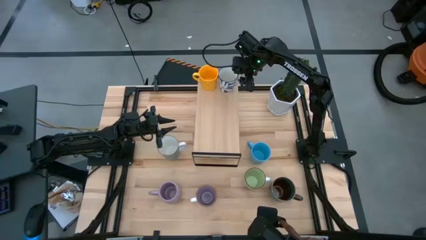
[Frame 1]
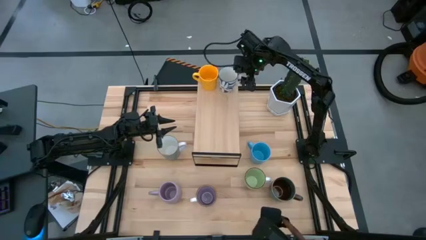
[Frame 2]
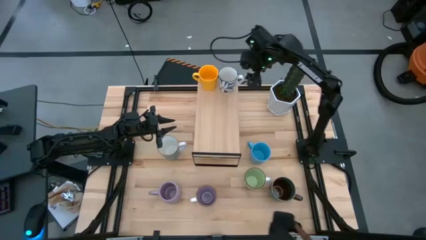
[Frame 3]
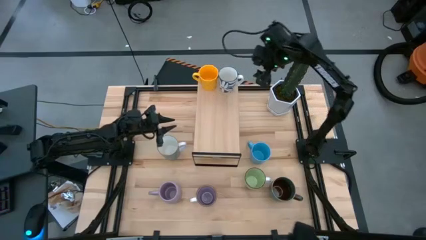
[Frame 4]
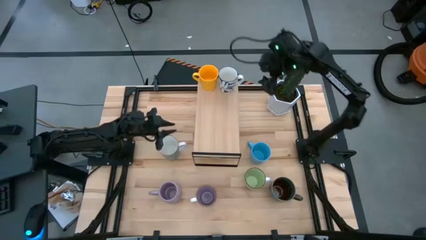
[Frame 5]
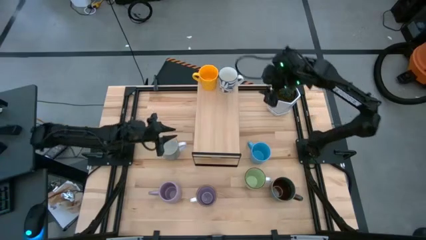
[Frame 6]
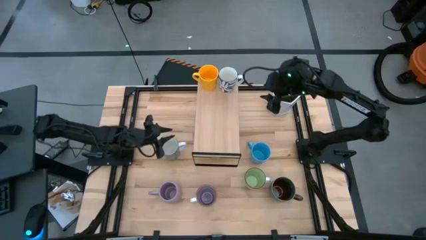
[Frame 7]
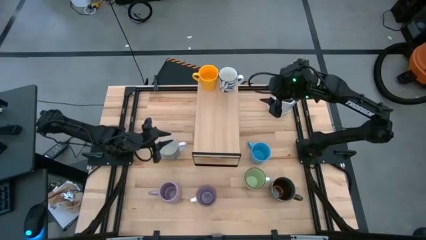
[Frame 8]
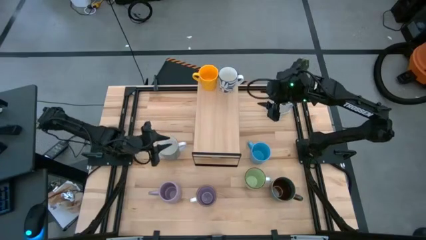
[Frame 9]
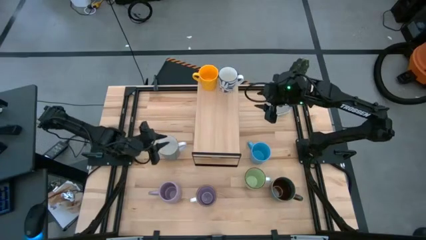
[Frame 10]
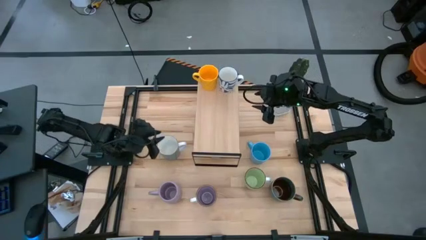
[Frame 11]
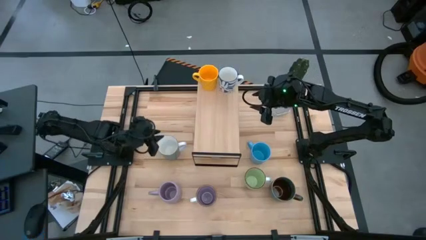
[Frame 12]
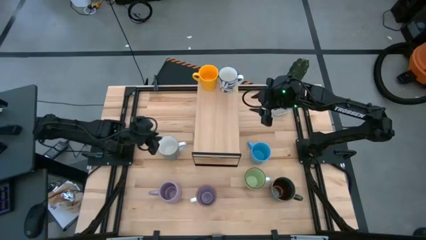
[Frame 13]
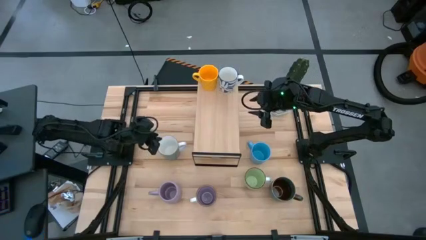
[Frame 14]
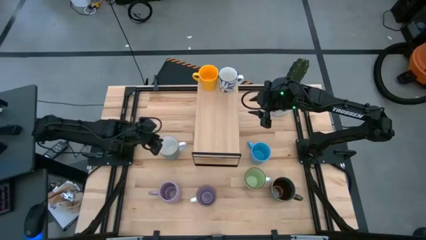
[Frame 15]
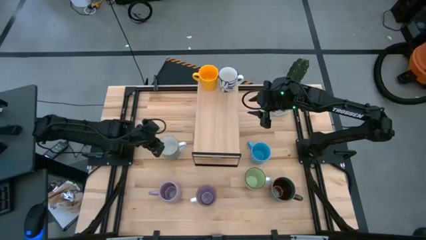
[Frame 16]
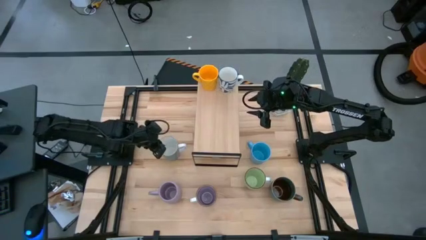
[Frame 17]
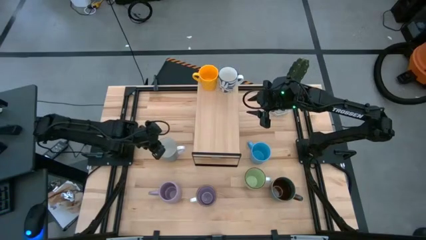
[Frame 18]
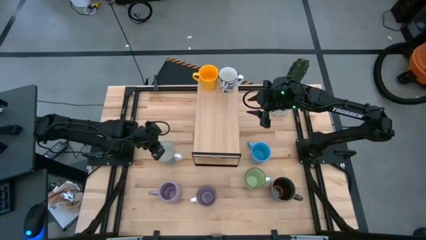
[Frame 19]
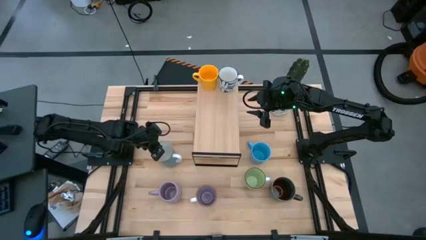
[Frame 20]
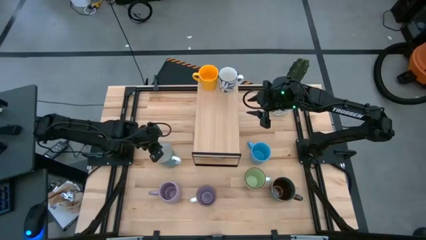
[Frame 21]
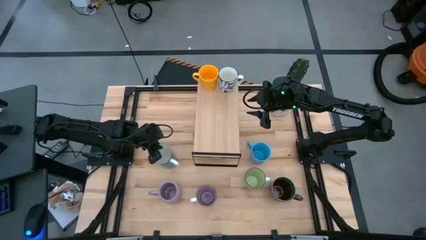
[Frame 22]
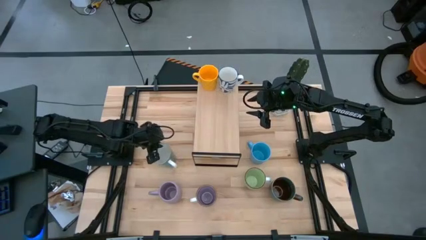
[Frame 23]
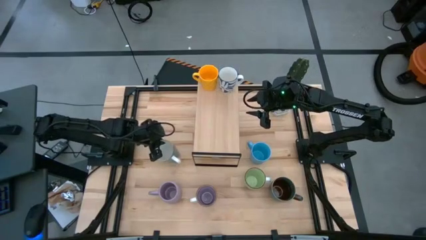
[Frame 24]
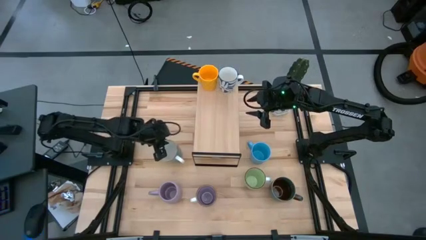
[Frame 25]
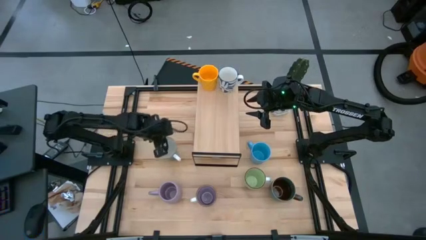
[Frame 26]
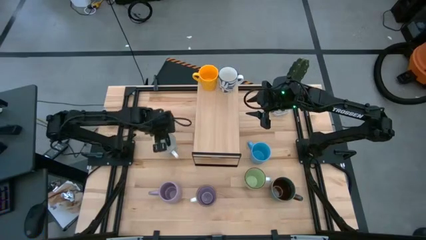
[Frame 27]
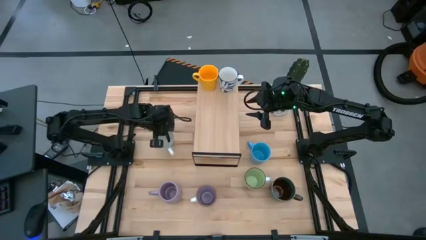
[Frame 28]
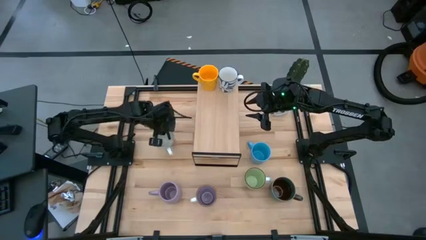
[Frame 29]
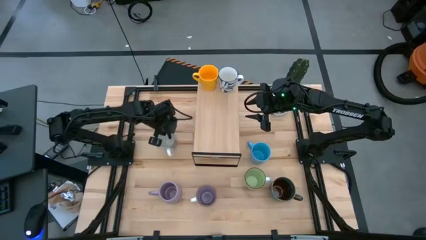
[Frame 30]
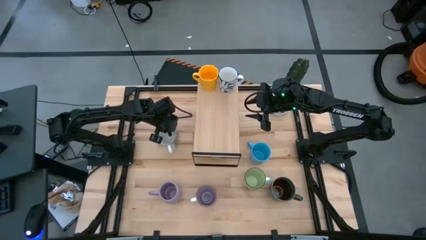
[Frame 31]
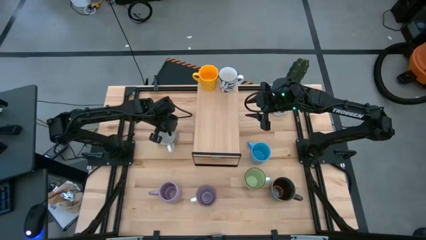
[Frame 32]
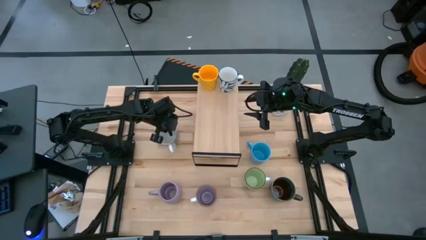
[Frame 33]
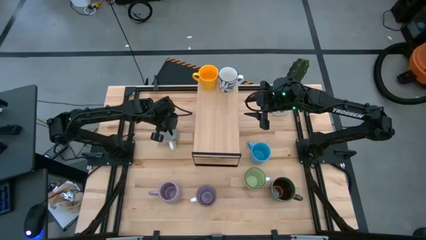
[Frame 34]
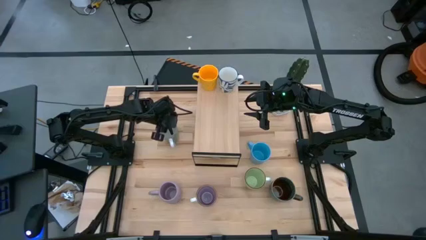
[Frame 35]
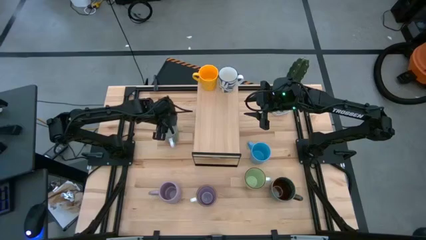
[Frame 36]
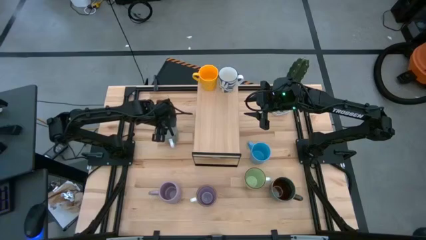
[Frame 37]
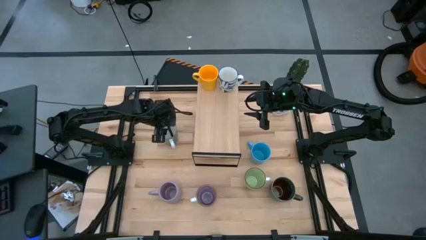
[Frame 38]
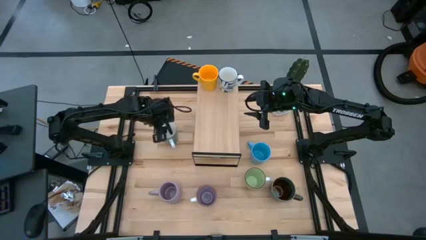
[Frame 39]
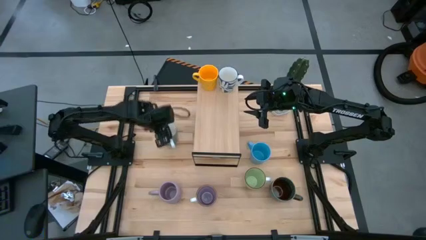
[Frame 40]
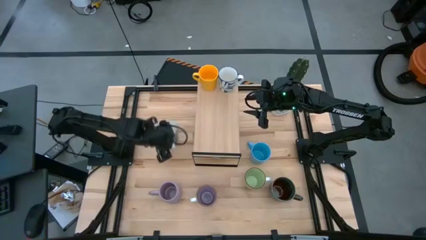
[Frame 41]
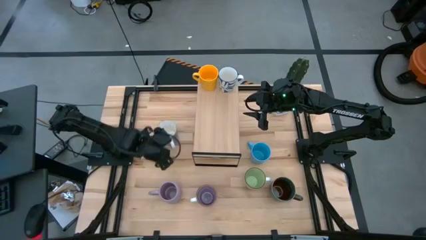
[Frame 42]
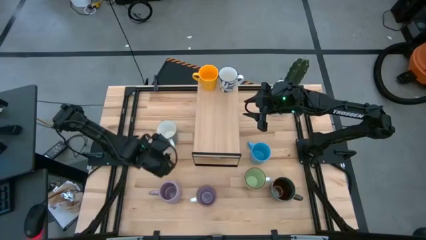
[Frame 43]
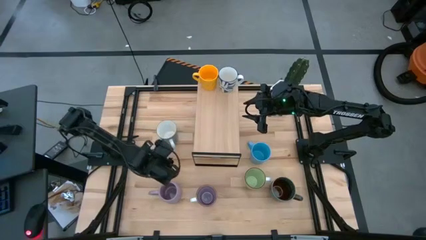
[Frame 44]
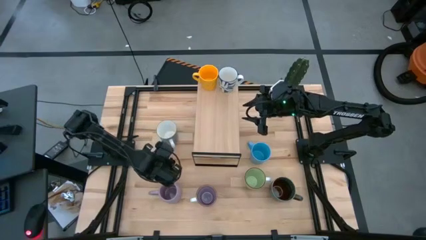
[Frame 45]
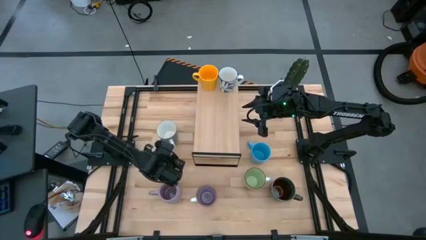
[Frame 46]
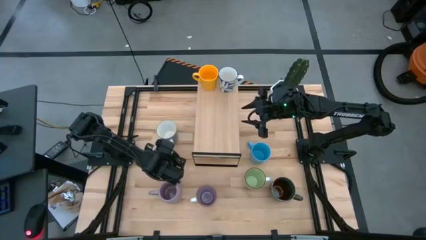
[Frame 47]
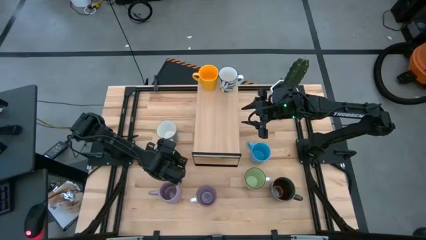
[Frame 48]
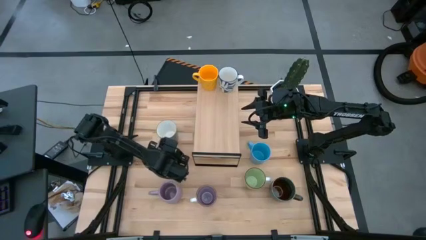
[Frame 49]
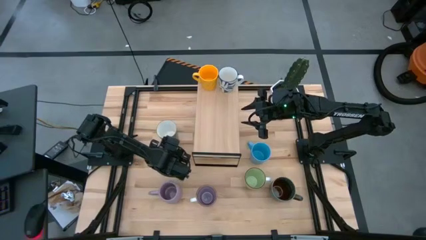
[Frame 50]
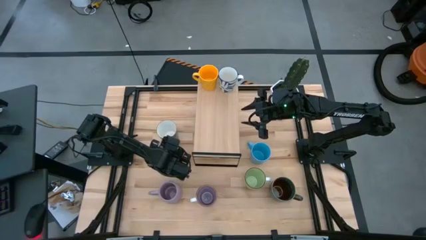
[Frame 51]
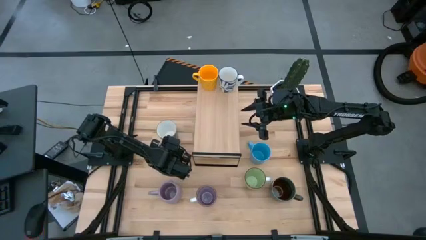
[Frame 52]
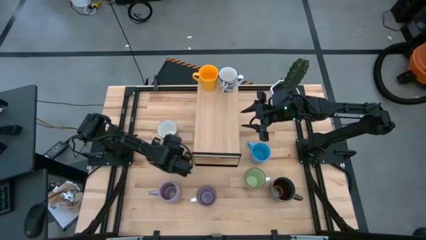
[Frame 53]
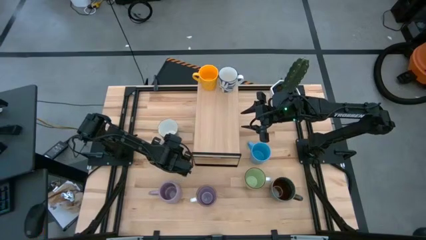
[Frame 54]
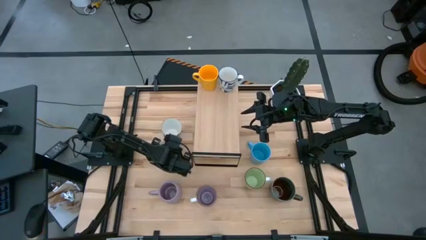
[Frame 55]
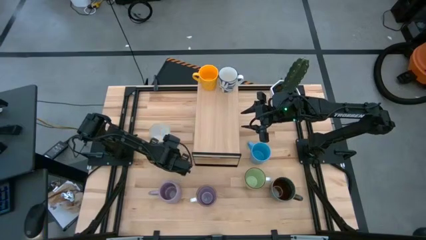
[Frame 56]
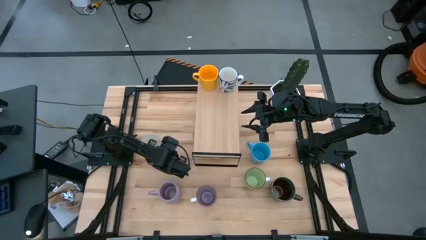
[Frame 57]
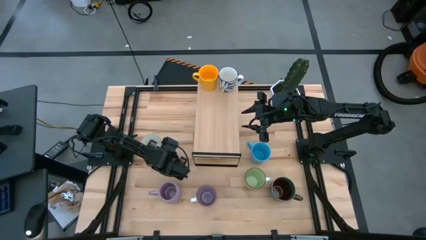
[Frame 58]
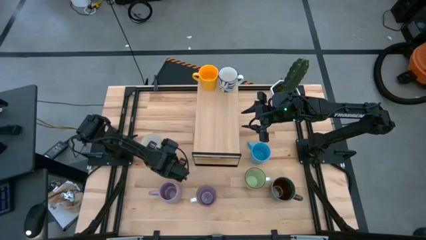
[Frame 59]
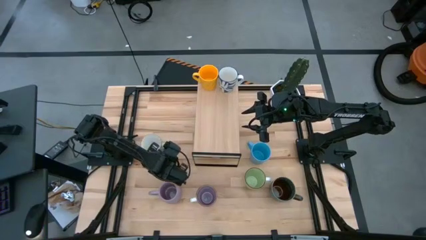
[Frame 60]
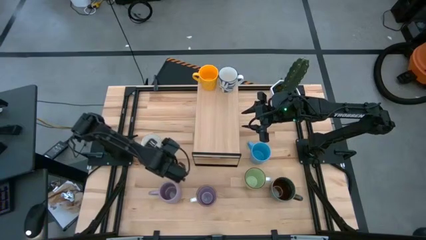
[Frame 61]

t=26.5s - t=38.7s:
Task: Place coffee mugs
Put the left light blue mug on the shelf
